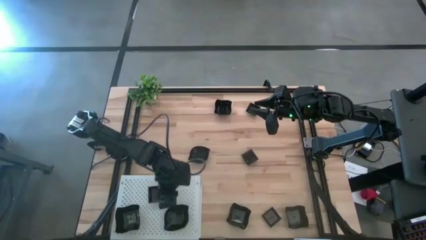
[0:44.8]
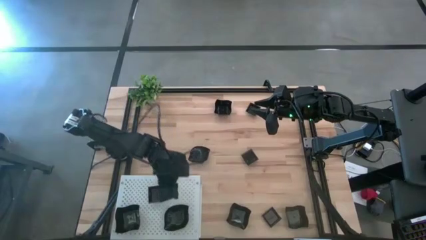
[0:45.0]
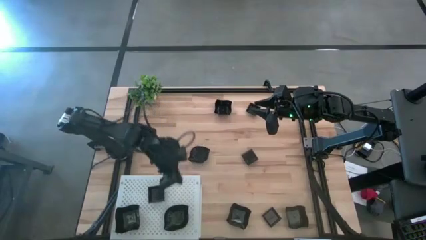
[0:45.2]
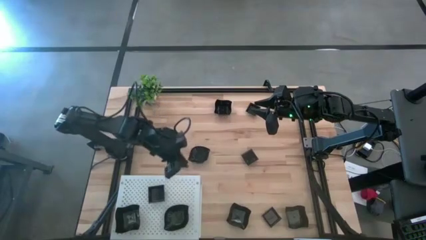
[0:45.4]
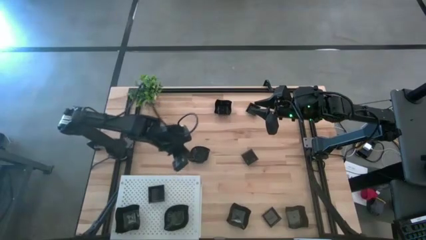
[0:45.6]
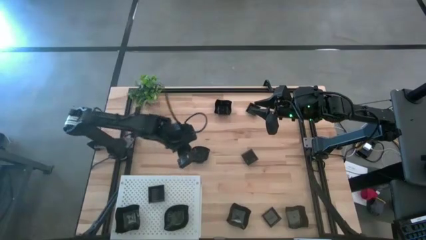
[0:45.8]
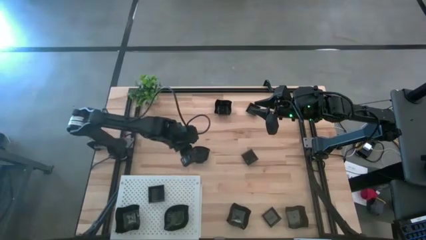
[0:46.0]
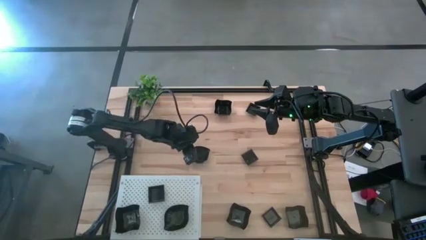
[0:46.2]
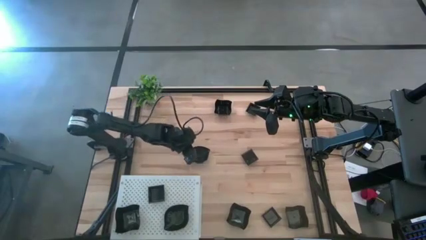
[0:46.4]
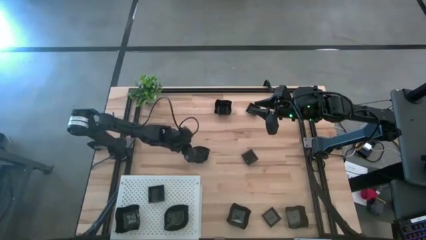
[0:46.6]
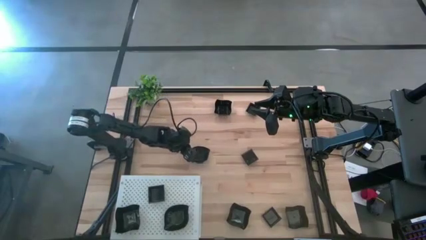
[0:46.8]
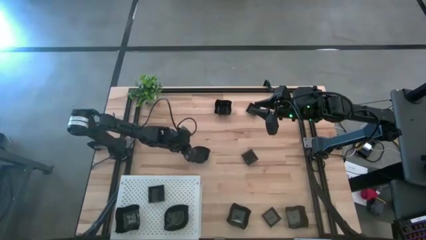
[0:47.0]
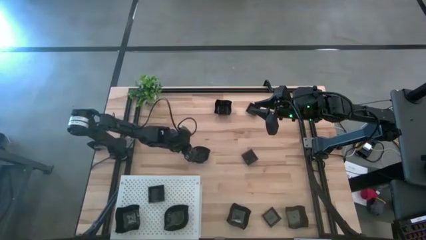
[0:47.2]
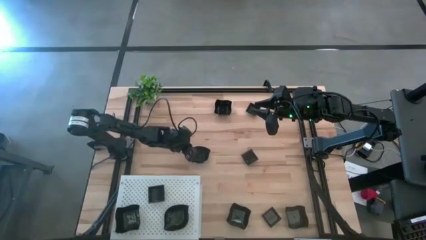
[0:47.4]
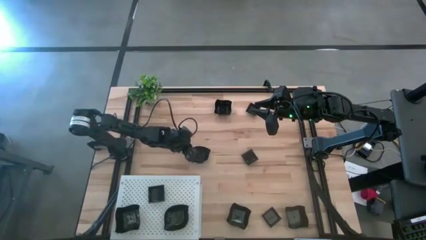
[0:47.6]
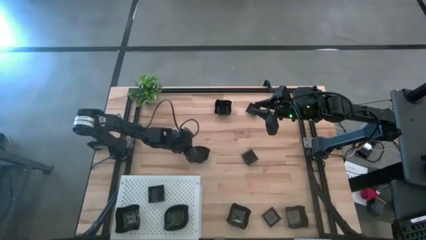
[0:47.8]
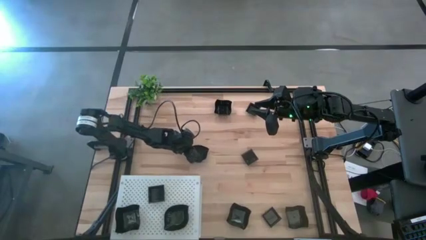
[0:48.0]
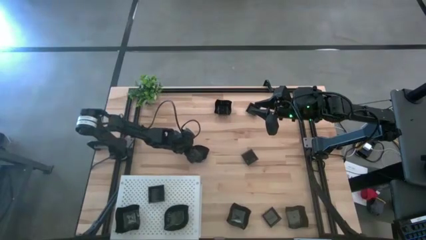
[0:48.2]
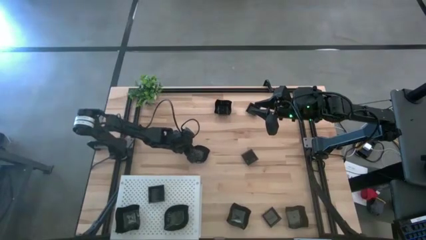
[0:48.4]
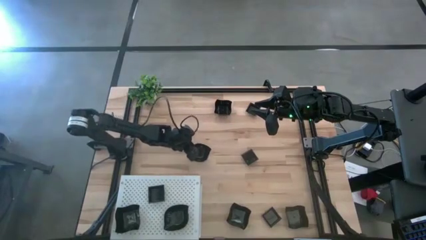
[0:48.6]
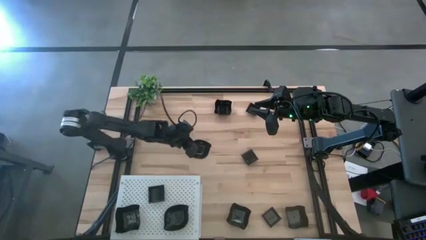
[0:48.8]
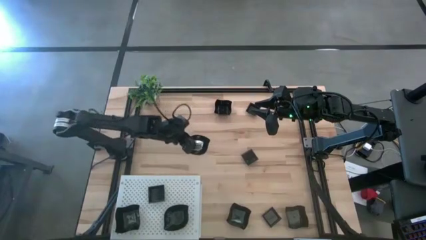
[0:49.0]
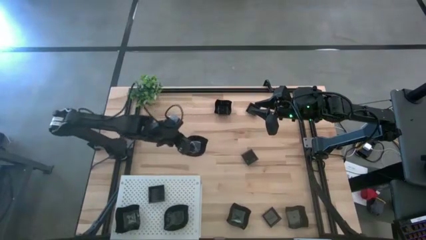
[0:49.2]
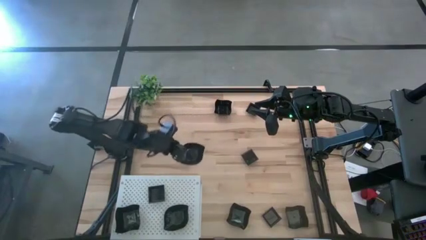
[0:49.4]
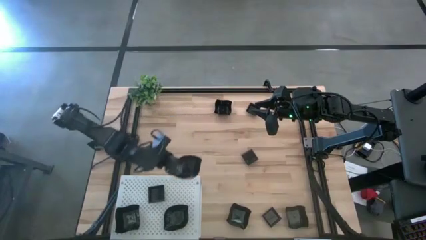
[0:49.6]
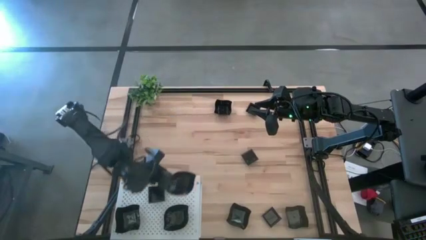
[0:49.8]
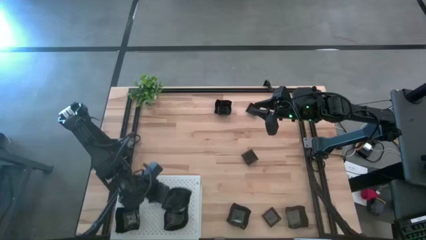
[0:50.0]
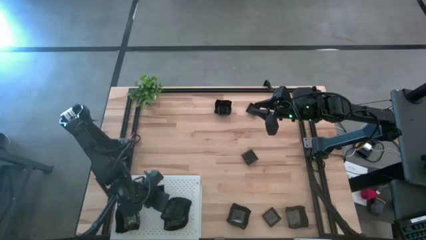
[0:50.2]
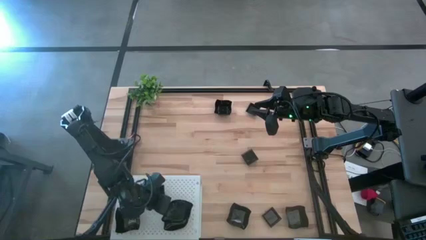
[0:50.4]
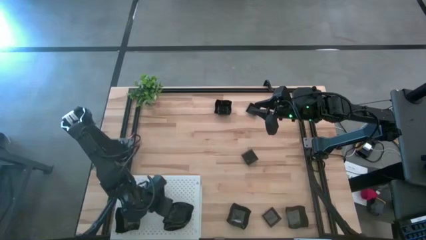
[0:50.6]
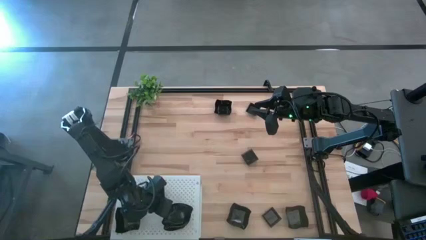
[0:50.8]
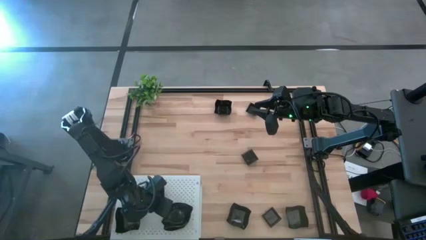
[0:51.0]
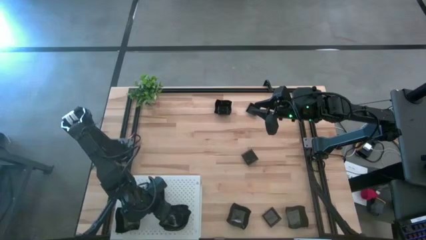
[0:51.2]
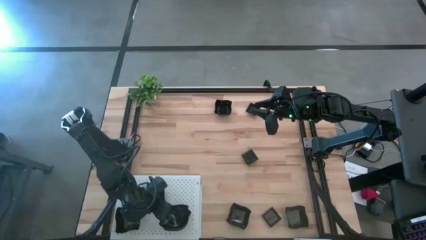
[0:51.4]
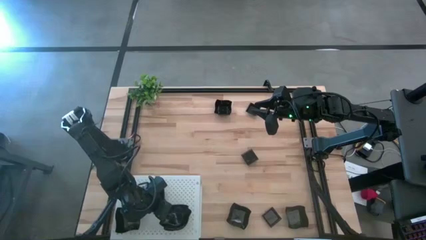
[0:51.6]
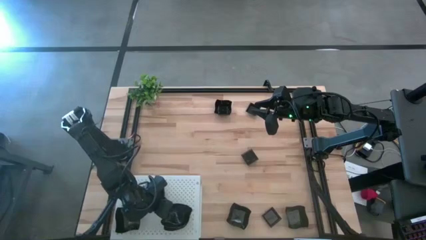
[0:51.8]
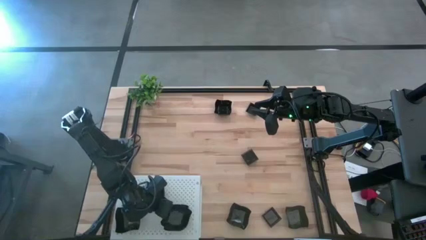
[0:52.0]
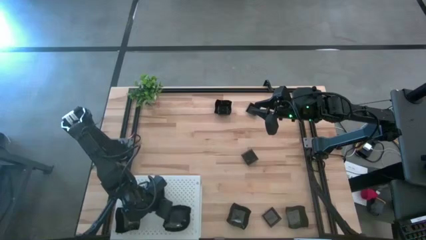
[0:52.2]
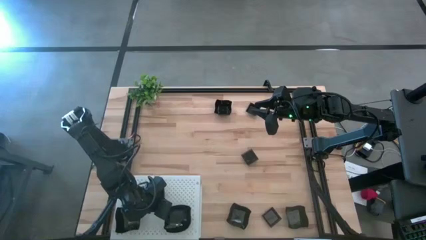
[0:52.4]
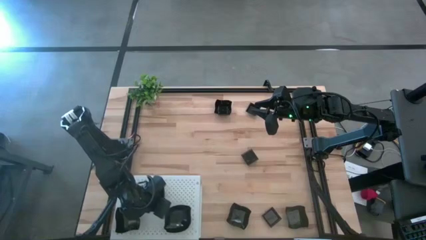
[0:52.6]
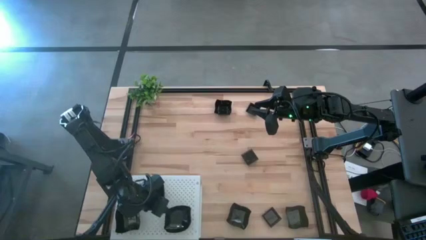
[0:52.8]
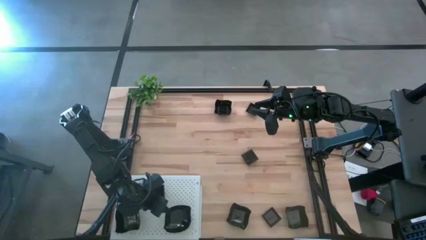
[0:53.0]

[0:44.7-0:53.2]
Task: Pick & Place Mini shaped plates
Stack the leaf shaped plate on top of the leaf shaped plate on the shelf

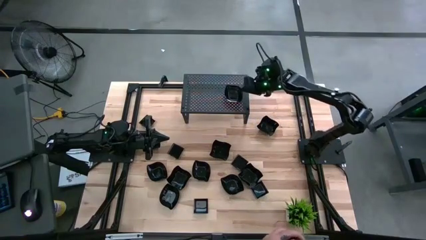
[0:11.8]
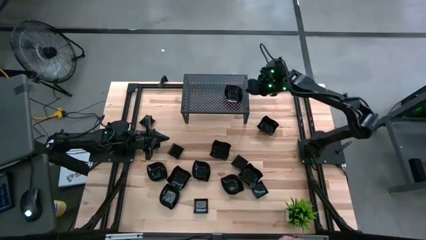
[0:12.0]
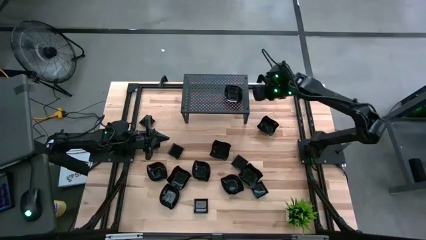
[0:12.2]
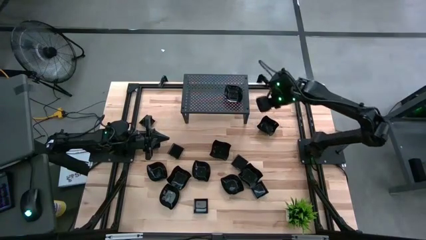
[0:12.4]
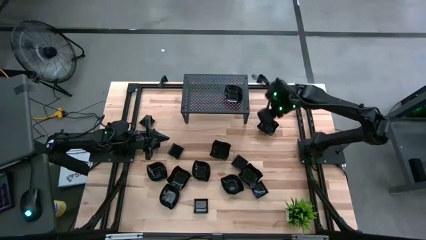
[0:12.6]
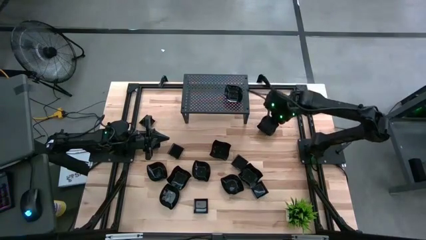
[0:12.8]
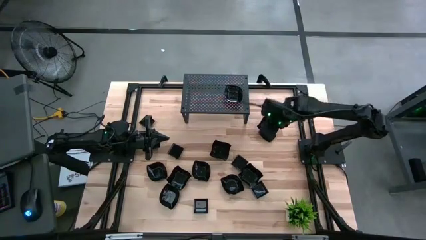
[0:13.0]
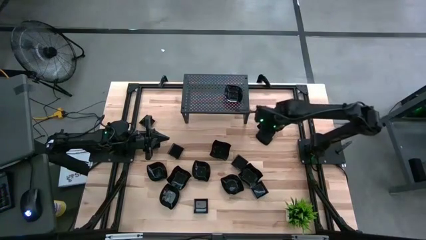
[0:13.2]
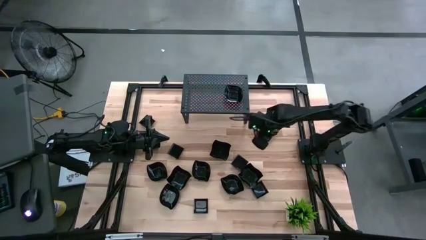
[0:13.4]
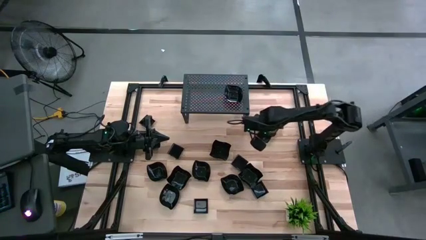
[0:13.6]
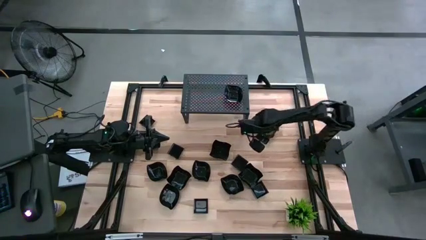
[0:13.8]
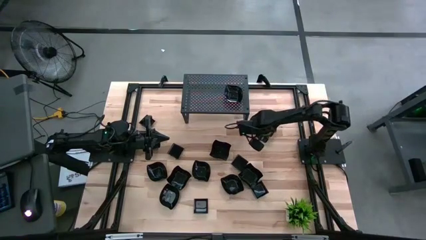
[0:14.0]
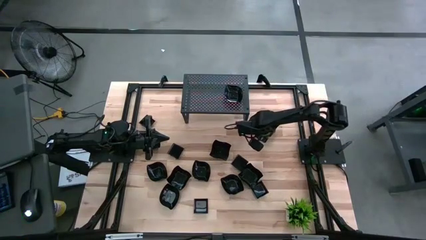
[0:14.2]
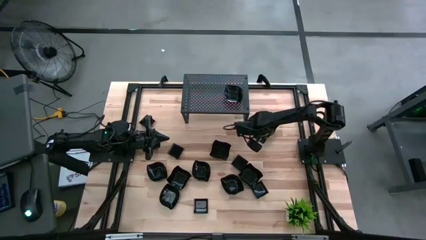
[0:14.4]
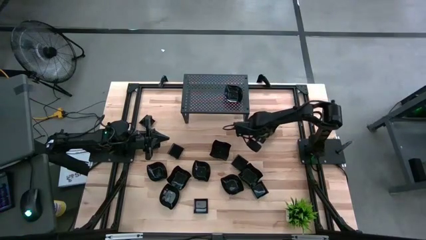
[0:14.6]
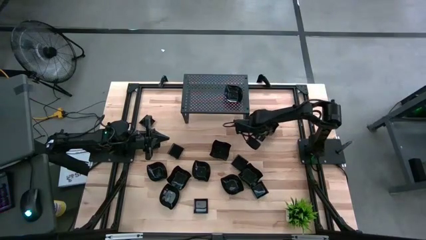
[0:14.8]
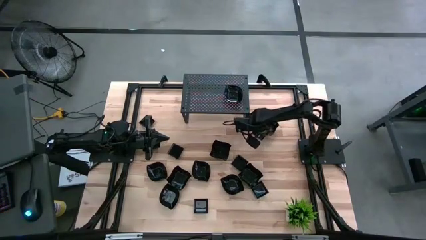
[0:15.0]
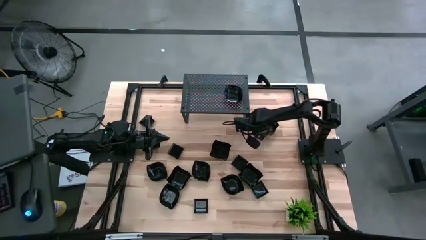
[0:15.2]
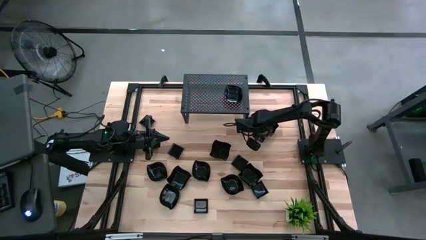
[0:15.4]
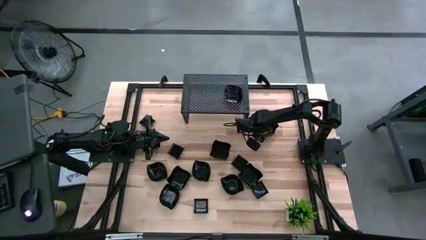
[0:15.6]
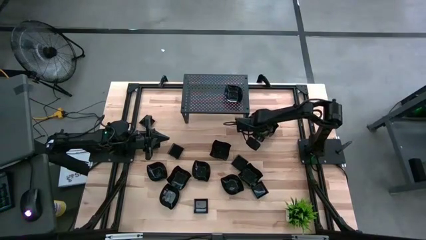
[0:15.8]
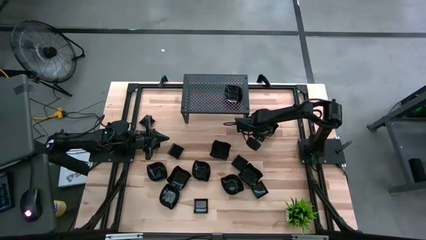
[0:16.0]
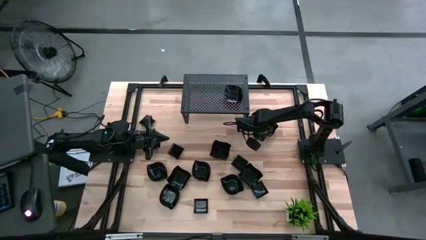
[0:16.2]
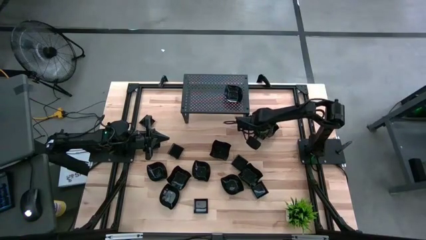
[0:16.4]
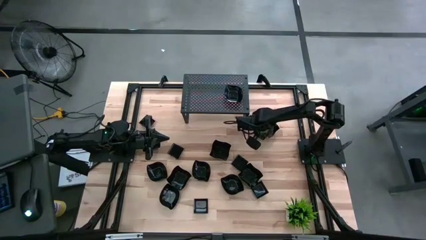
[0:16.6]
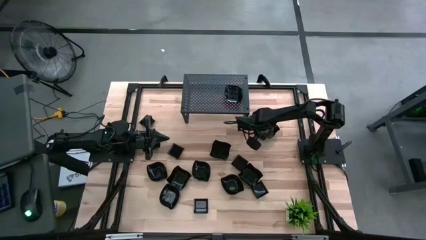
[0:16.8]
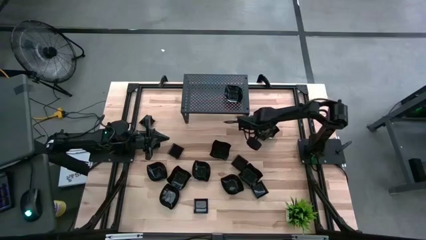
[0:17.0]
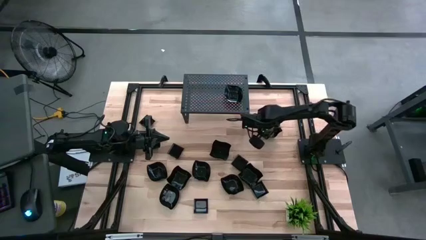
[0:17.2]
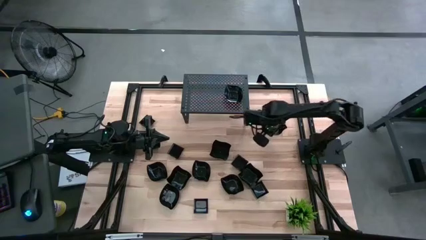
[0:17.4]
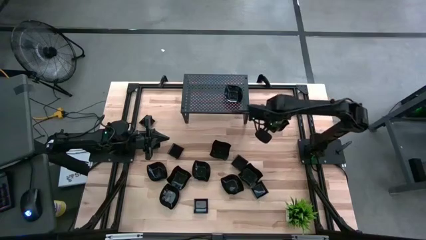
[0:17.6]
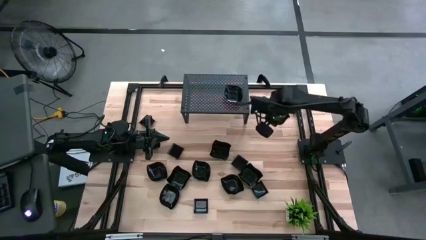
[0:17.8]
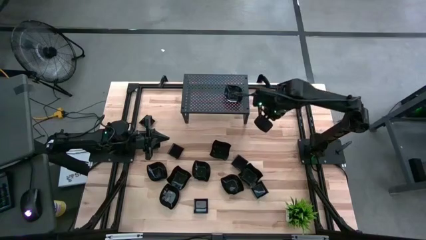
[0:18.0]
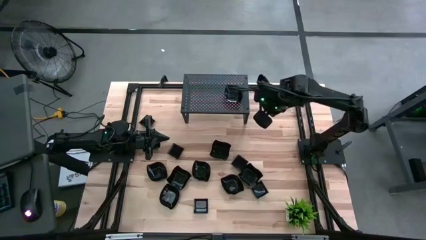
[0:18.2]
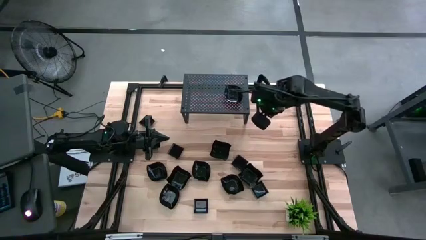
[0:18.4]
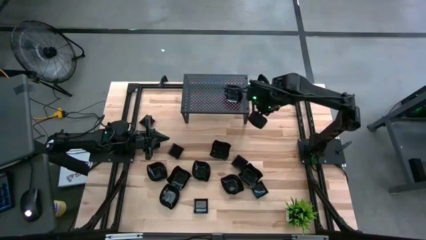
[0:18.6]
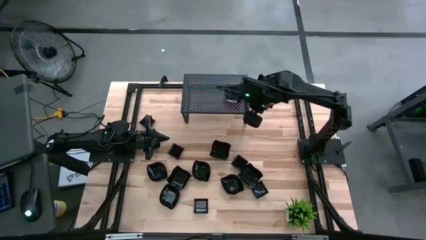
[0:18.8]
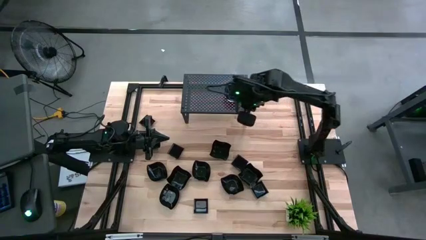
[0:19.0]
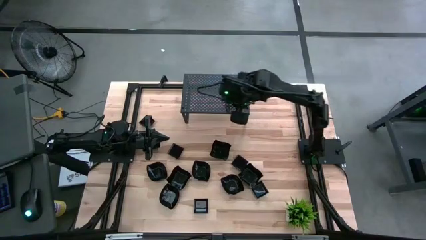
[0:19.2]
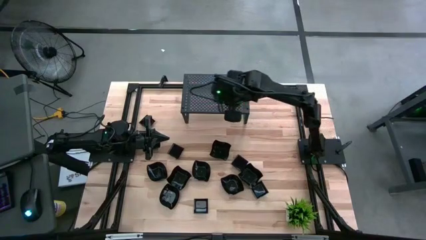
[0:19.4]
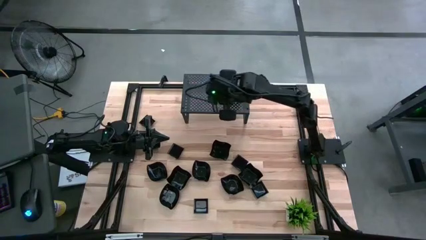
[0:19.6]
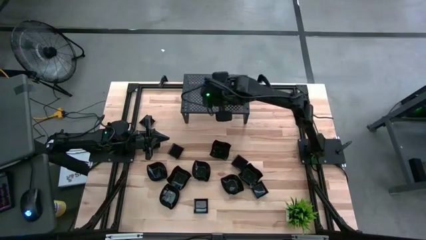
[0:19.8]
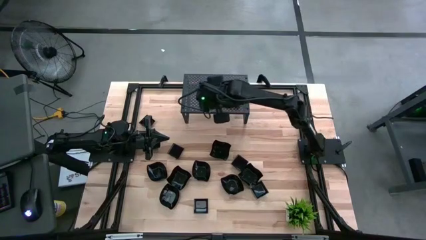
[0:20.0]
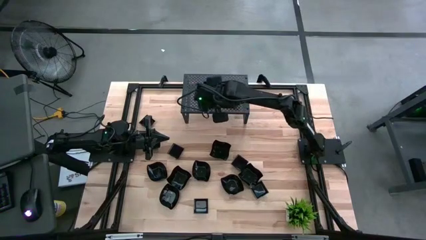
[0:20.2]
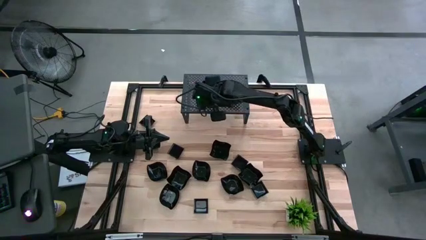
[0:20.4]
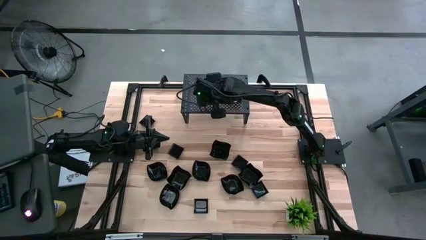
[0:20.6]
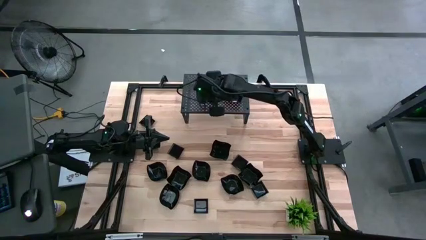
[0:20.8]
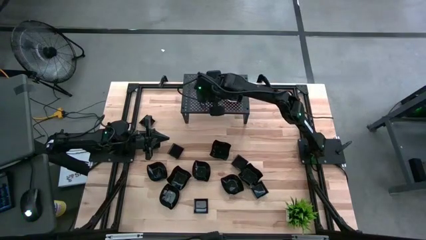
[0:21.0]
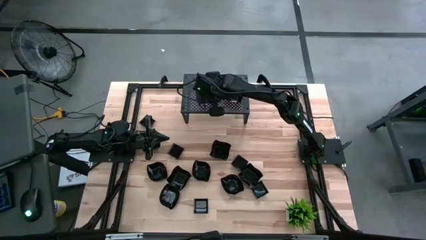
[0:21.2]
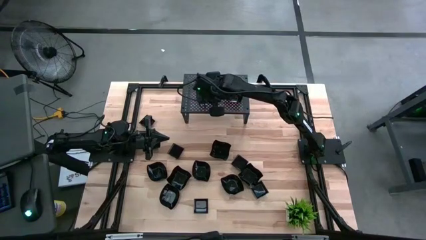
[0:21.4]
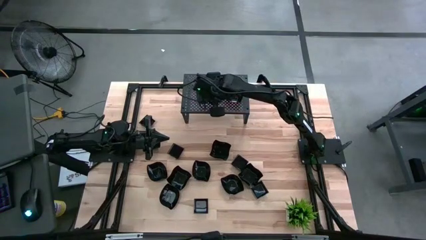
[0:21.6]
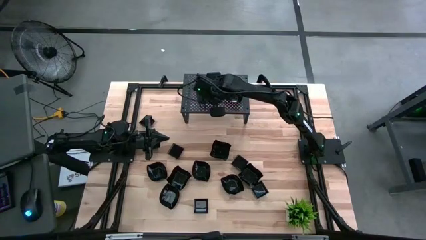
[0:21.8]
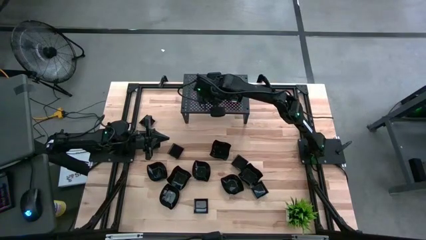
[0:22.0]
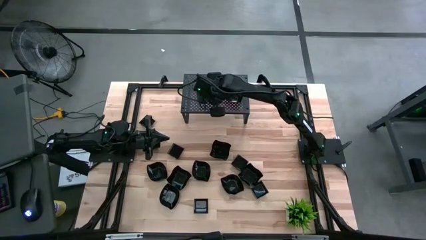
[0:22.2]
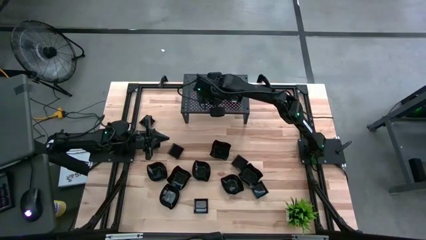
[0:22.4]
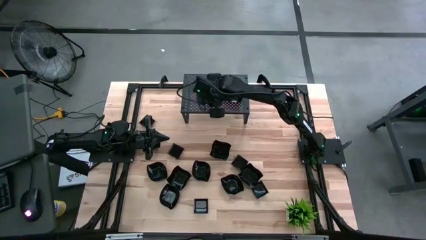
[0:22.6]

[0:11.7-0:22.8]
Task: Pick & Place Mini shaped plates
Put the distorted square plate on the shelf
